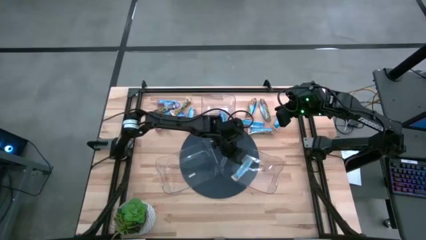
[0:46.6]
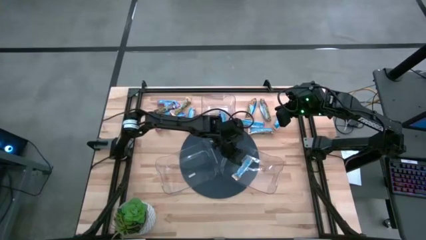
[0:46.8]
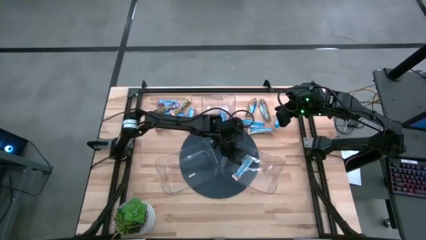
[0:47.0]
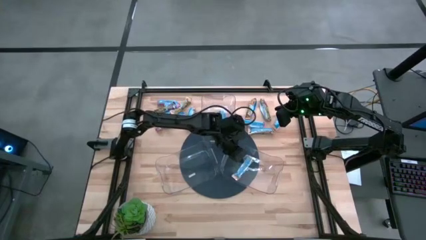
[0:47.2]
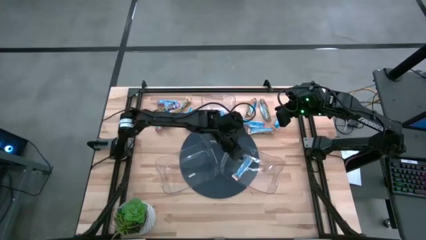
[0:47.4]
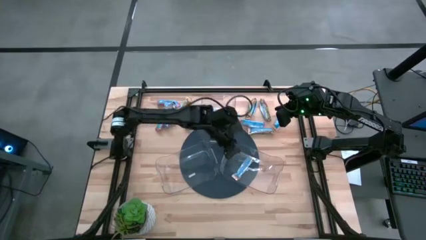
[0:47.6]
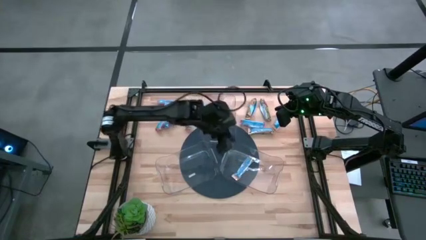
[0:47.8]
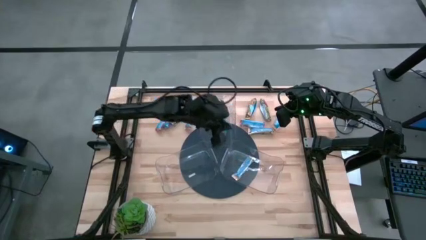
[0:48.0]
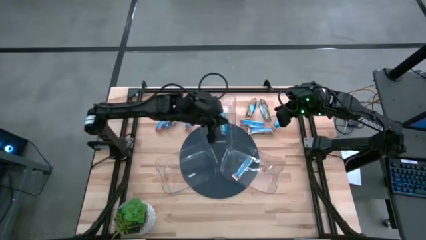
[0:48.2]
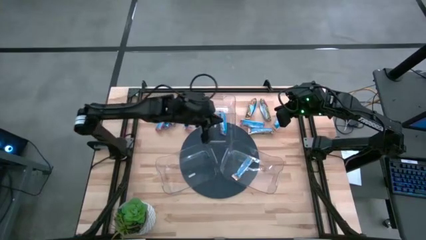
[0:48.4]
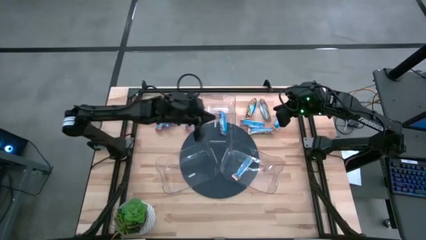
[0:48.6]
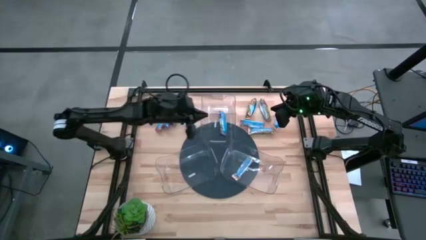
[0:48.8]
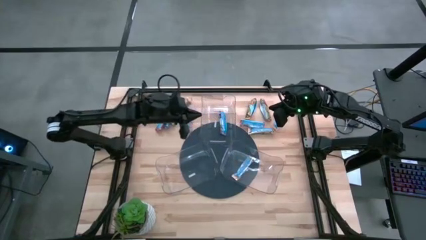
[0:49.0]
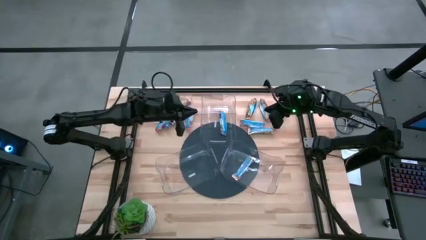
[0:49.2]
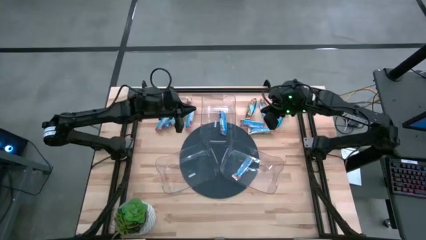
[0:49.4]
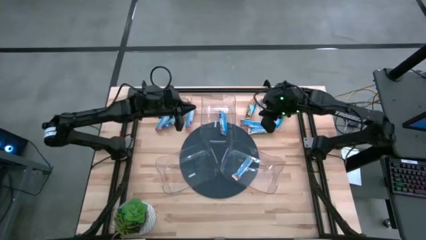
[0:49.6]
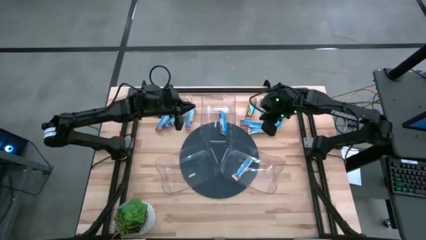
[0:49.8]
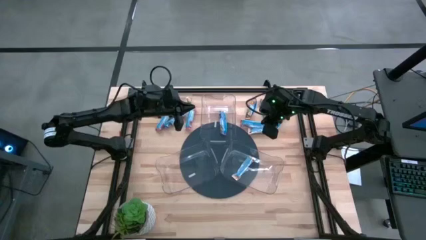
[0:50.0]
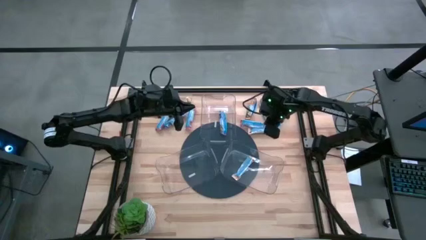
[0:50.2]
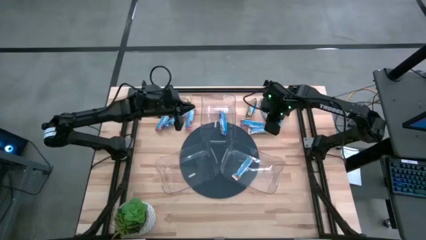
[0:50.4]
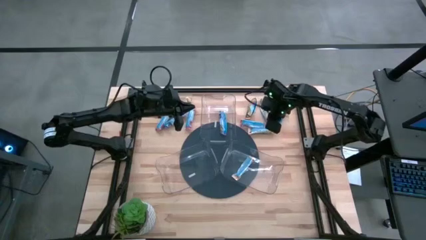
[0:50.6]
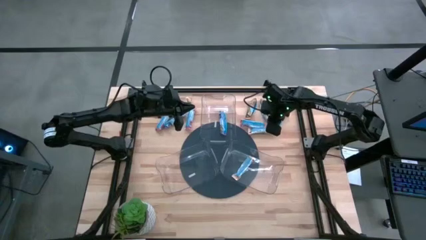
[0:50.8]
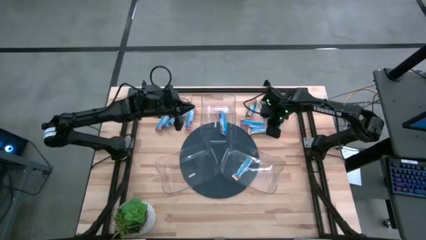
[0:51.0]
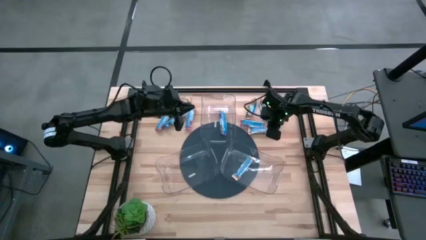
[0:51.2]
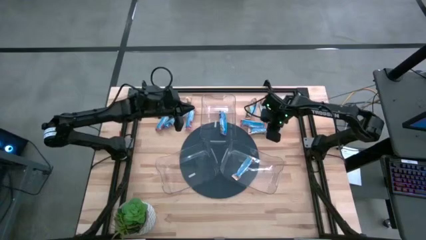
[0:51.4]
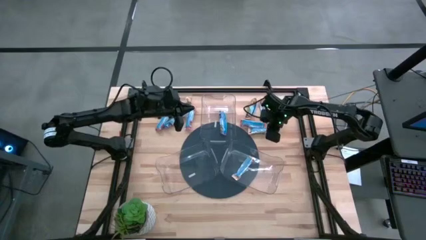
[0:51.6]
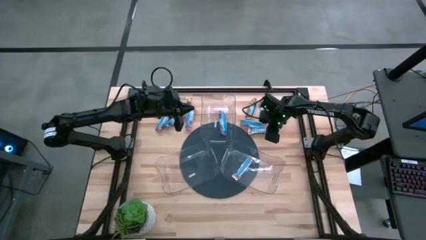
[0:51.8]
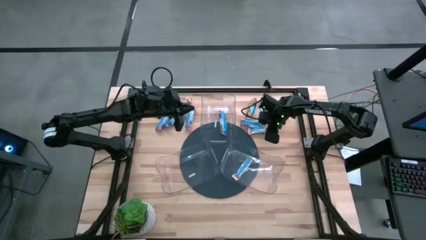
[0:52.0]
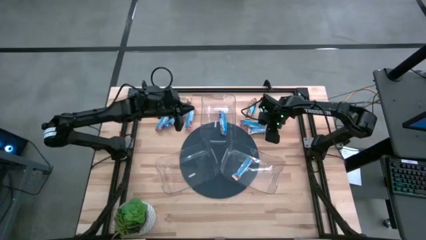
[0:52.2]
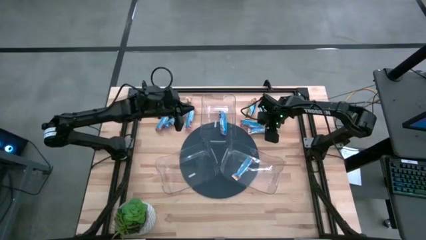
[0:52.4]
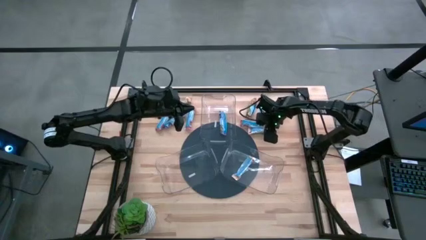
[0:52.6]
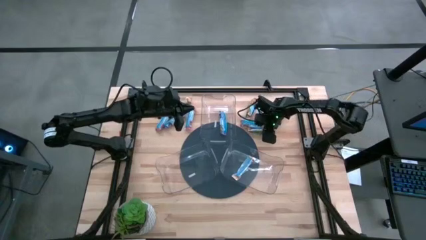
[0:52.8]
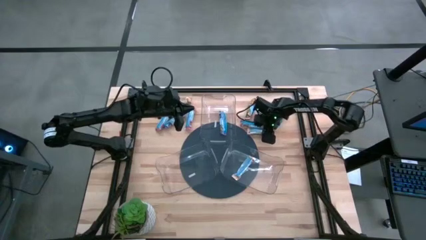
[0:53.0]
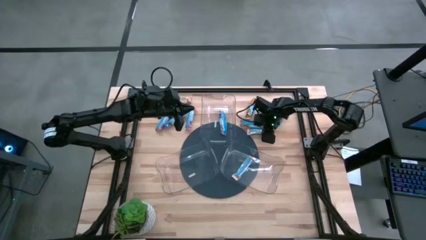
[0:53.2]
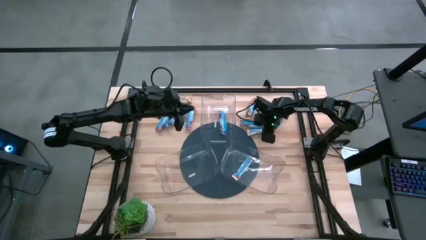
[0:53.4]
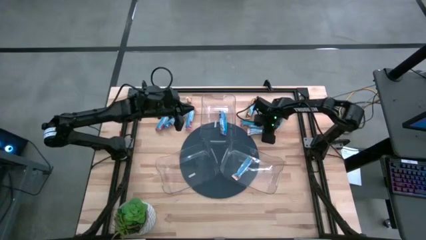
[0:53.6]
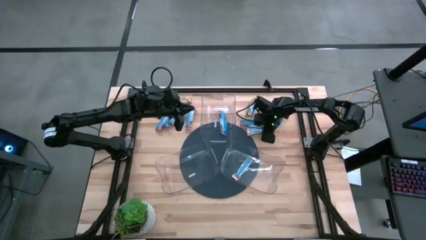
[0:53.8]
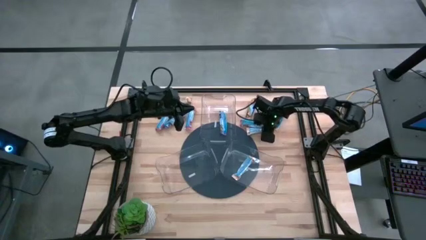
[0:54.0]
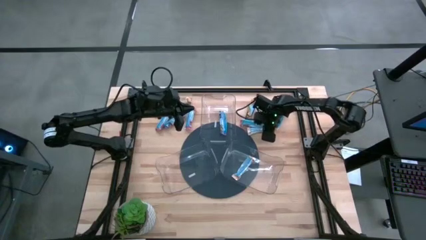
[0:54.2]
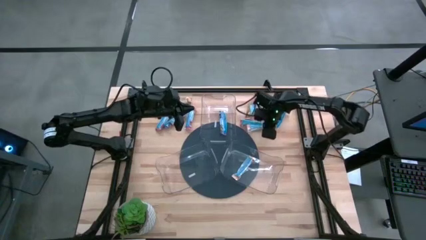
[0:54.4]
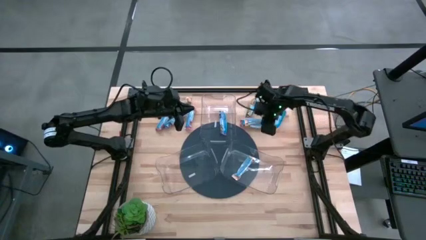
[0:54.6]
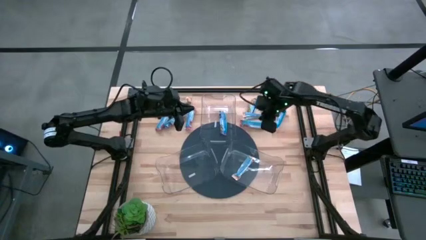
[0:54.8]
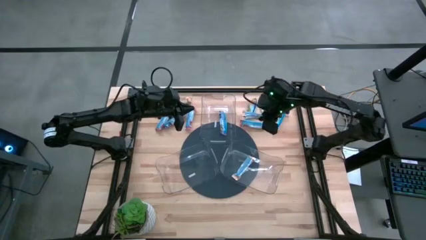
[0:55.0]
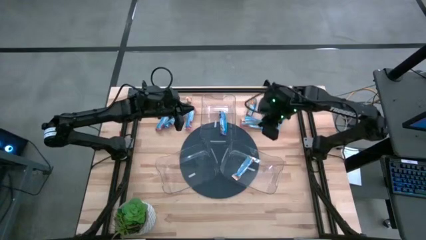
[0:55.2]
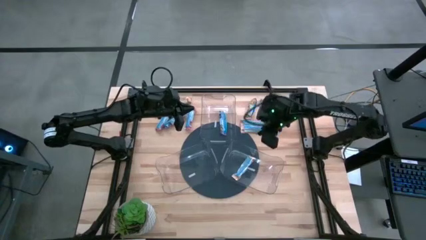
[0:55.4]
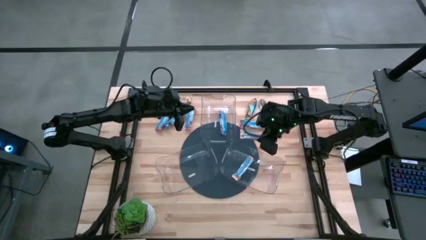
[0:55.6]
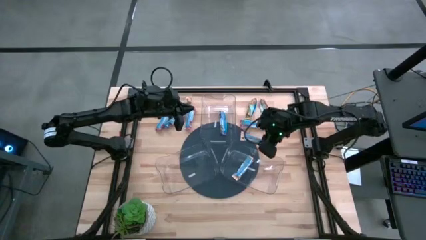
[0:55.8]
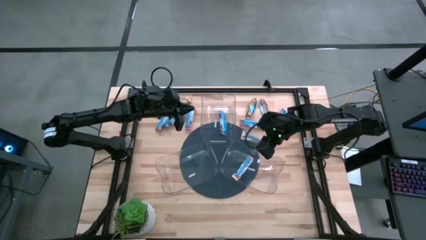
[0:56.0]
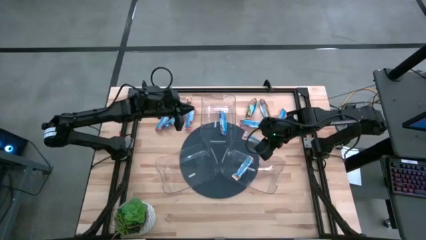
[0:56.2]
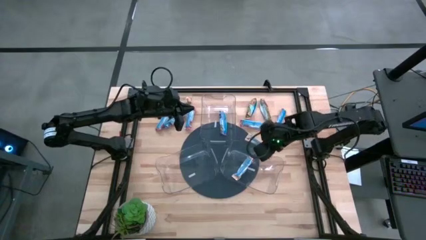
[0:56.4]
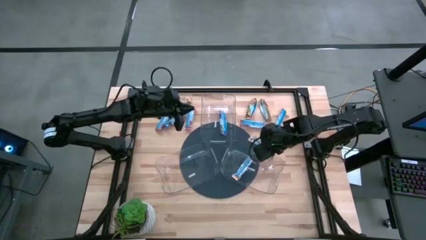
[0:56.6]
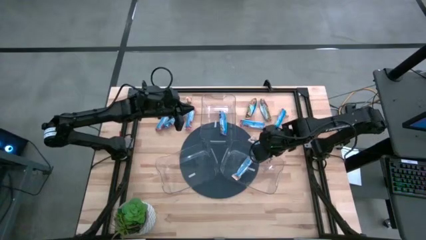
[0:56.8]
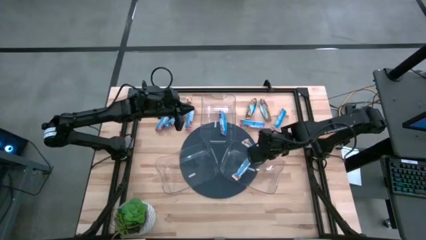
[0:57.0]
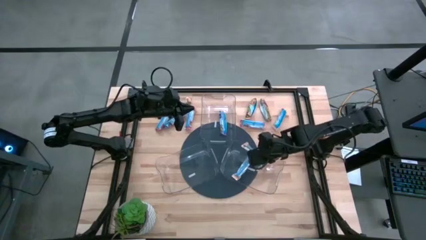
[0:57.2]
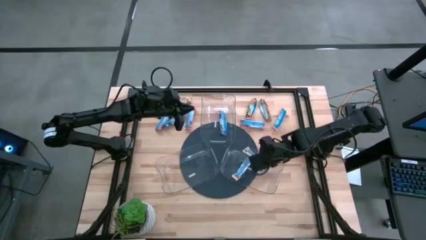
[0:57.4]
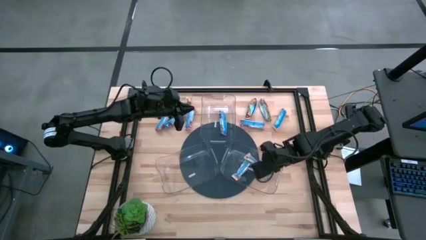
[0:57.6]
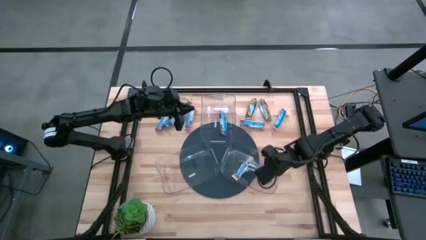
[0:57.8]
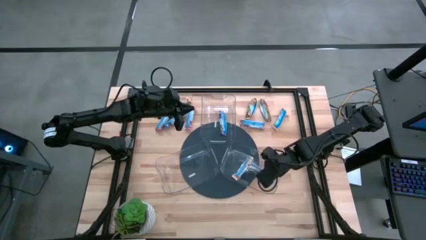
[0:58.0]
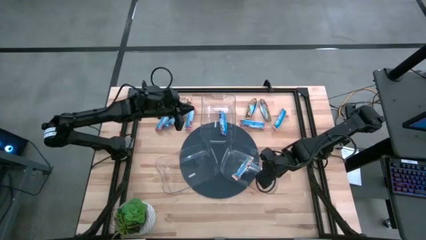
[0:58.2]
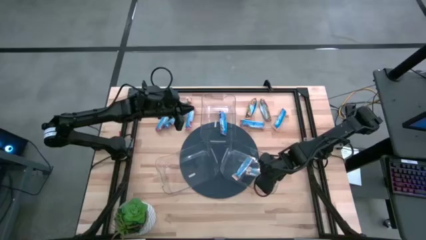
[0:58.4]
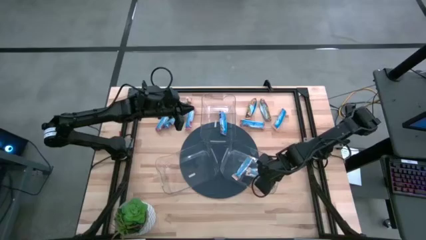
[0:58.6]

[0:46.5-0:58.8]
Task: Pick and place Granola Bars by type
Put the yellow granola bar into the right transparent bin

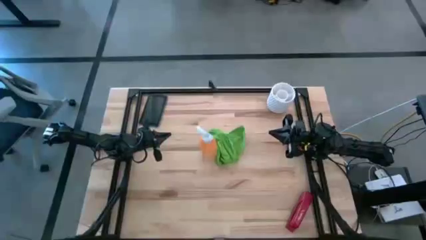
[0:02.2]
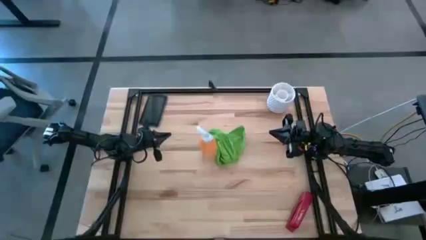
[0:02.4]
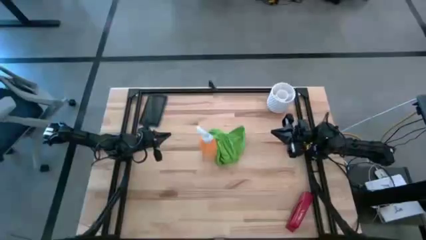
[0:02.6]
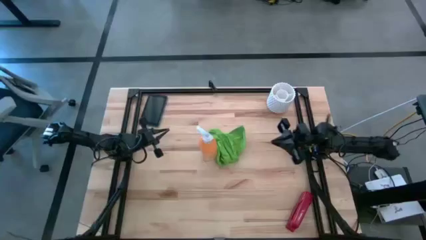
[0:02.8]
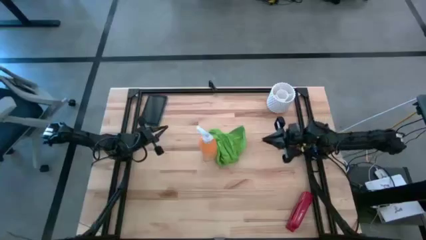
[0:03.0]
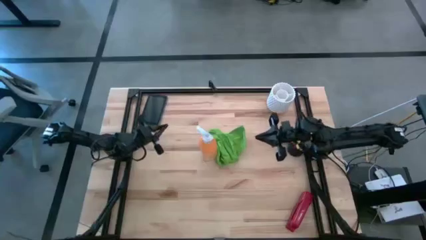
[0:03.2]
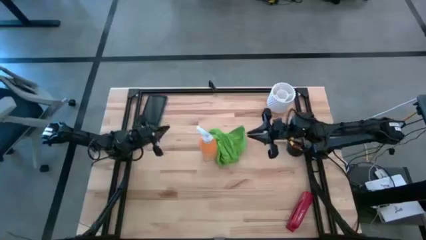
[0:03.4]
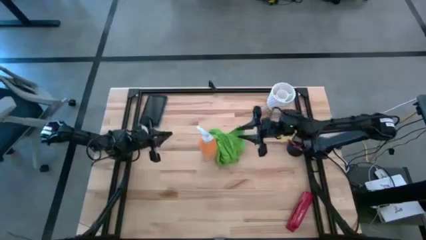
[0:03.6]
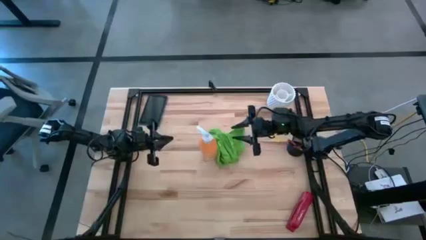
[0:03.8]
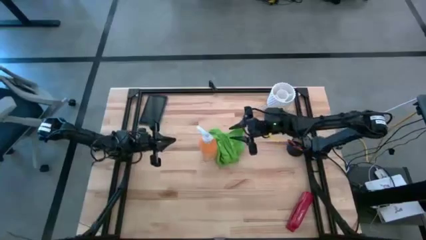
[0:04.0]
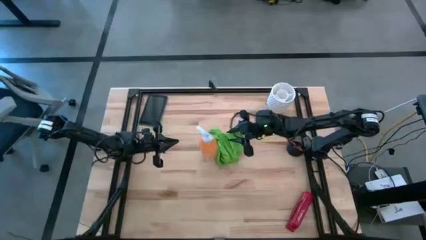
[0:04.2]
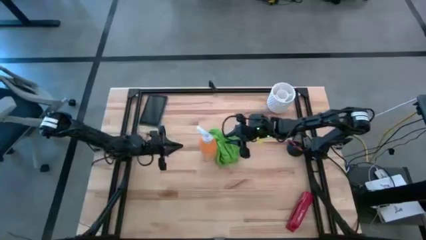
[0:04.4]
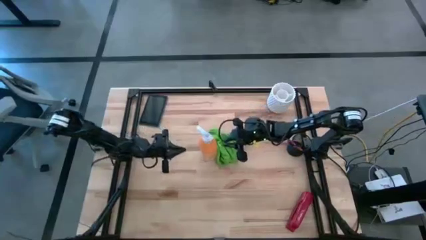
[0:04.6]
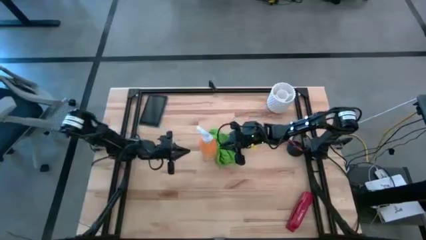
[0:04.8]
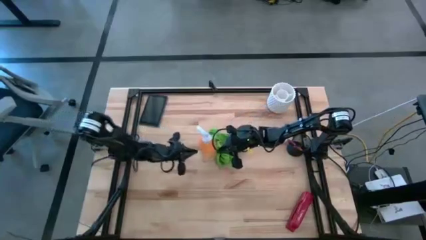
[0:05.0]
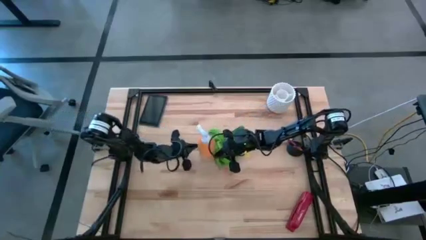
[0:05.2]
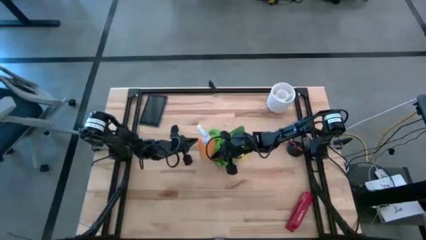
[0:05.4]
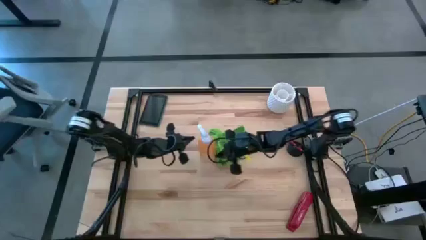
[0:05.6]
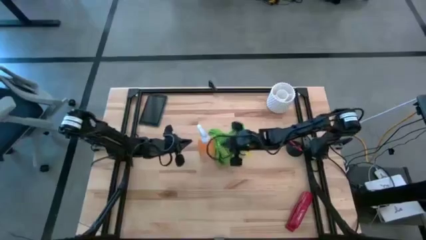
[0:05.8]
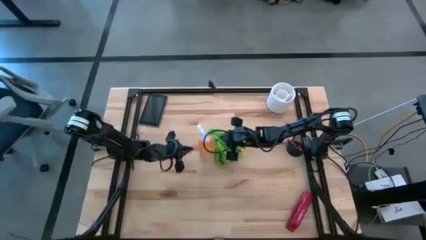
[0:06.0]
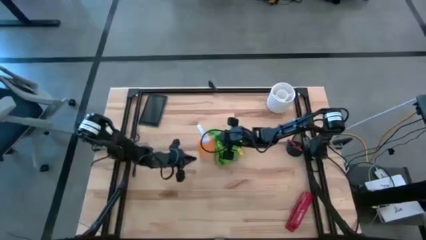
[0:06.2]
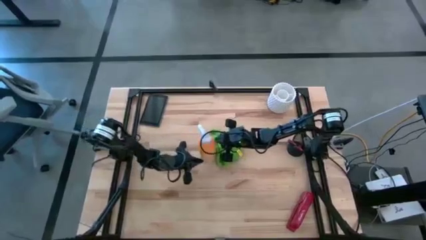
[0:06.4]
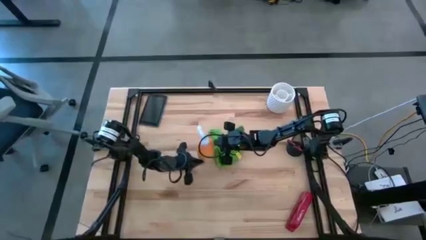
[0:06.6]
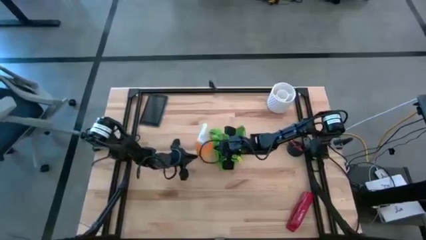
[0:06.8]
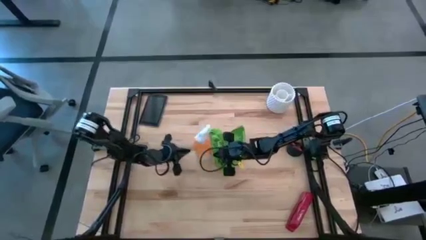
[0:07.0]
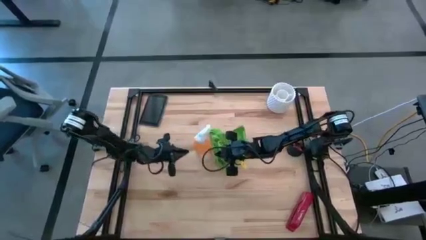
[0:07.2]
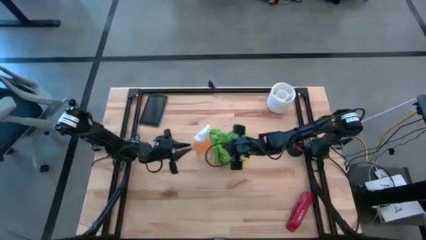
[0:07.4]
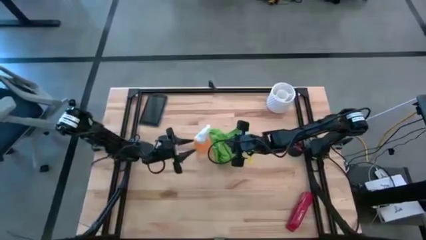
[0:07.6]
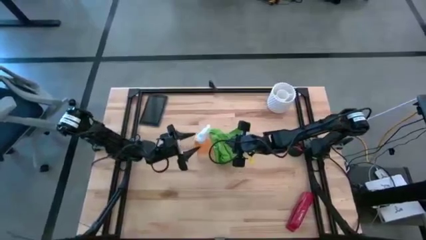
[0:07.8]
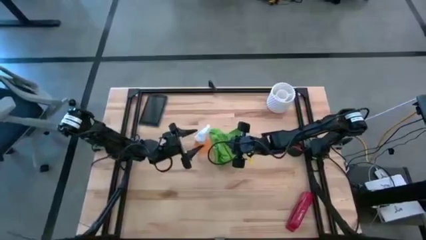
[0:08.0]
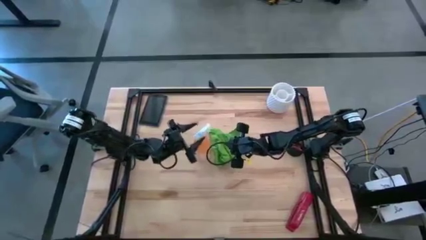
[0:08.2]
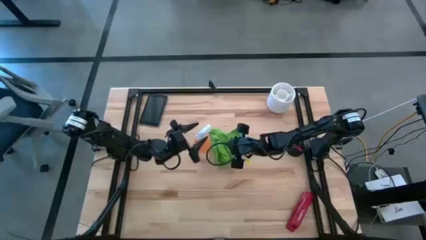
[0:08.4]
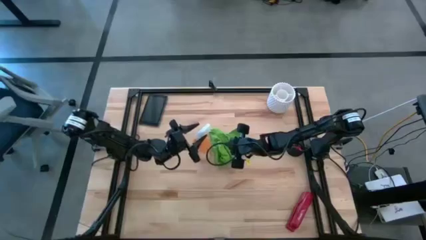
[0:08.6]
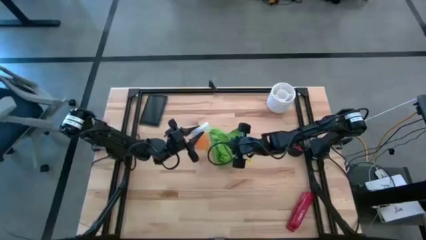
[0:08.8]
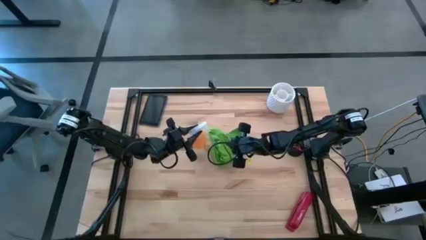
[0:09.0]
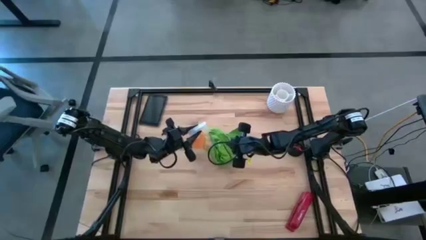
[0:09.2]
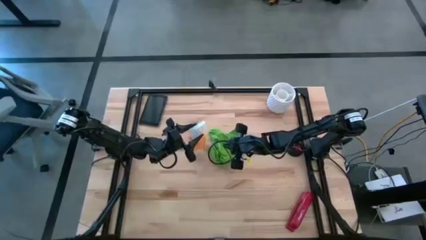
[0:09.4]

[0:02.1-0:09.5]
Task: Apply microfiber cloth
Prepare the spray cleaning bottle
